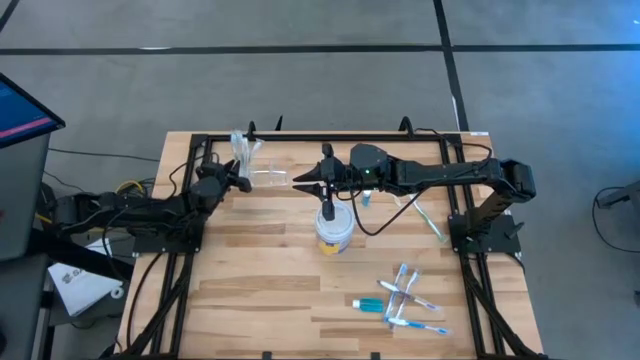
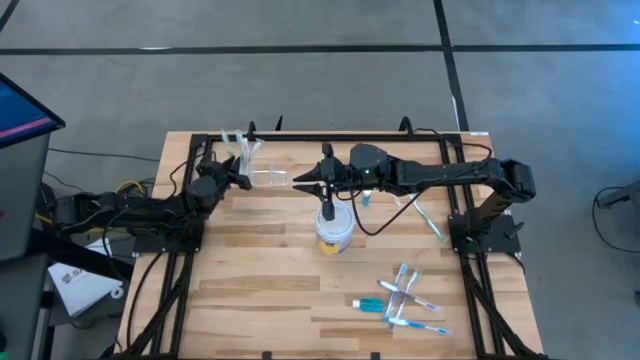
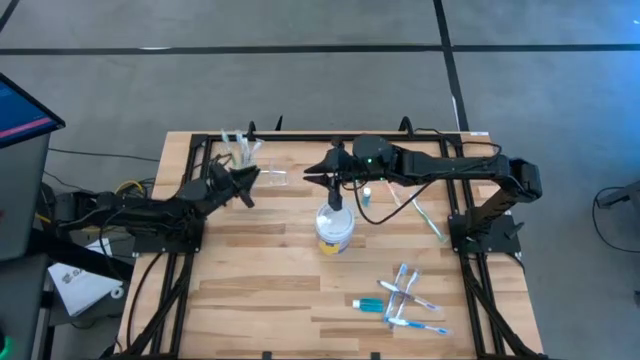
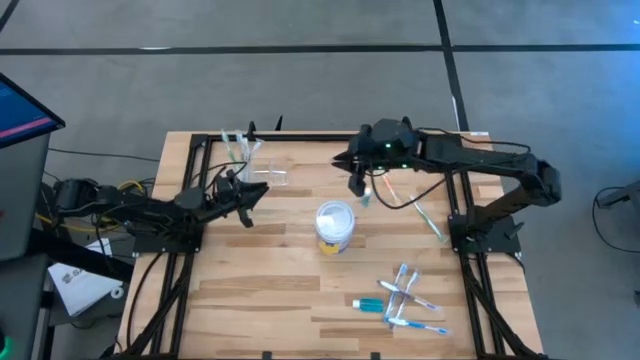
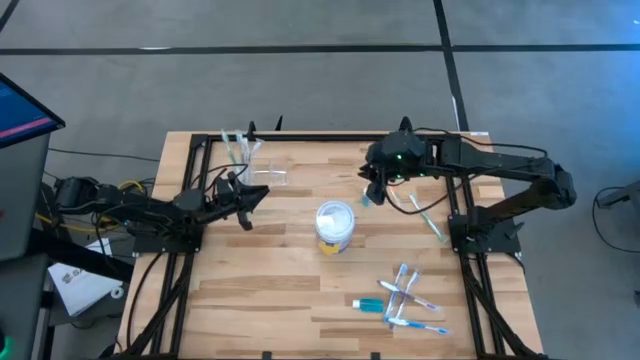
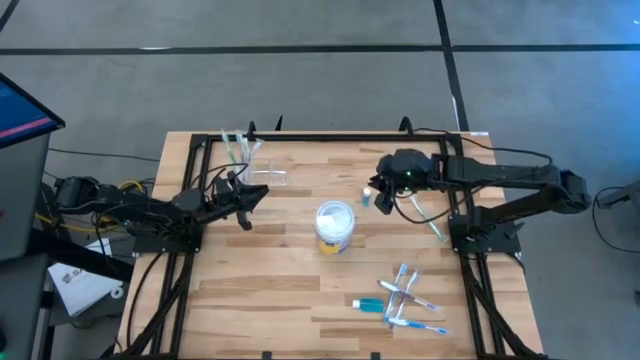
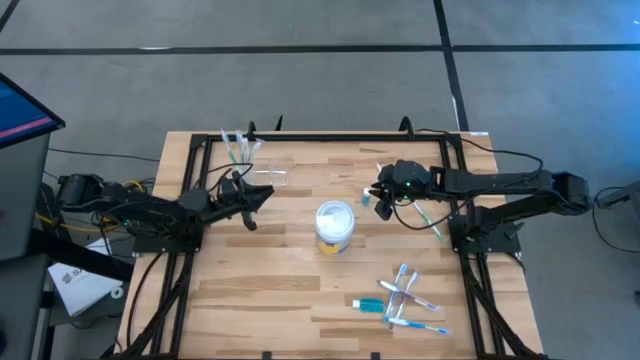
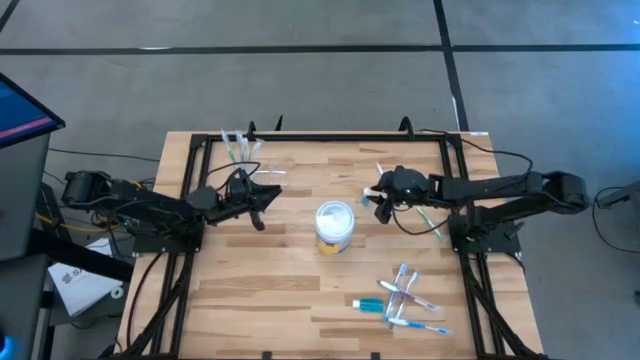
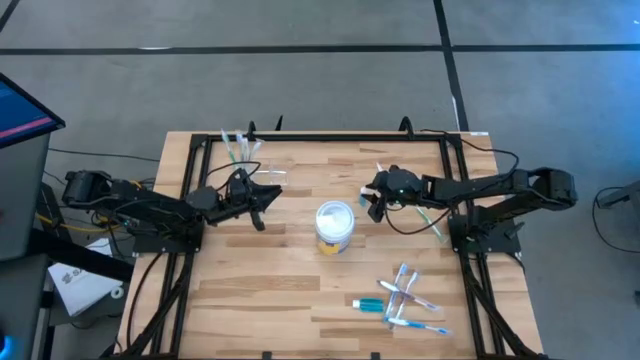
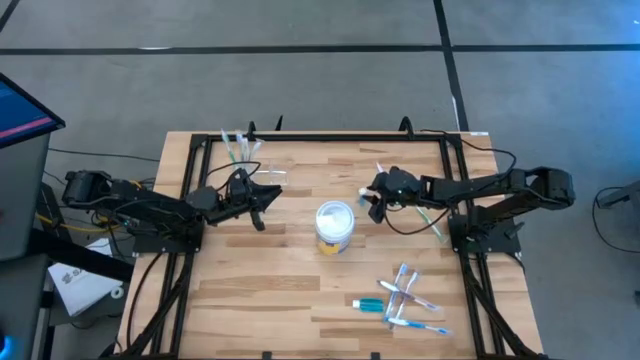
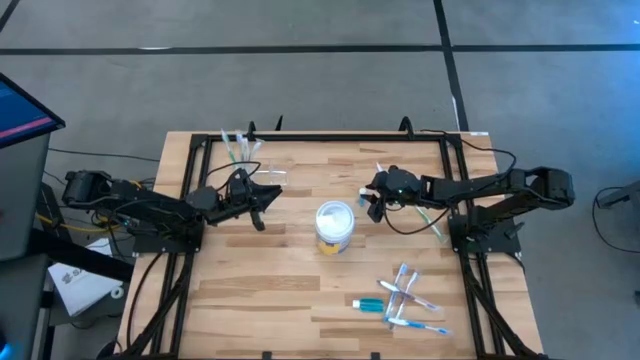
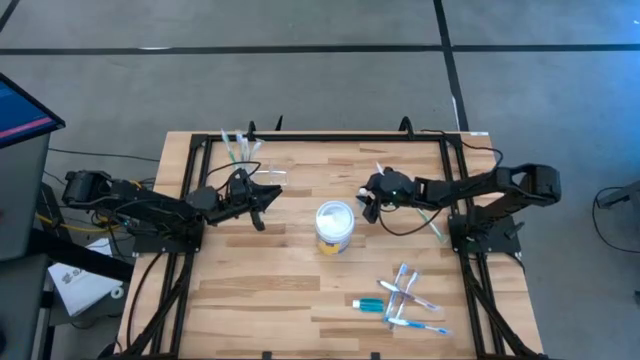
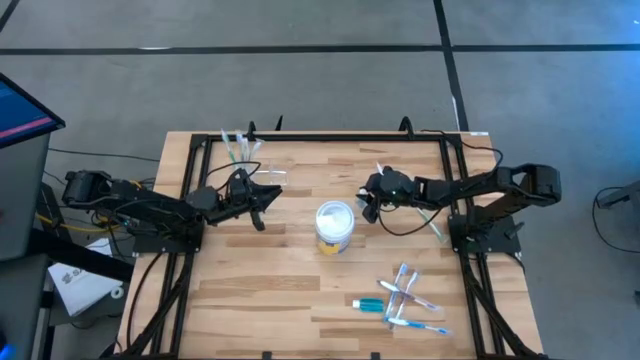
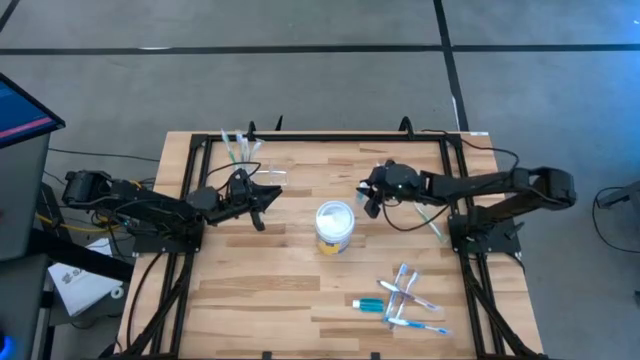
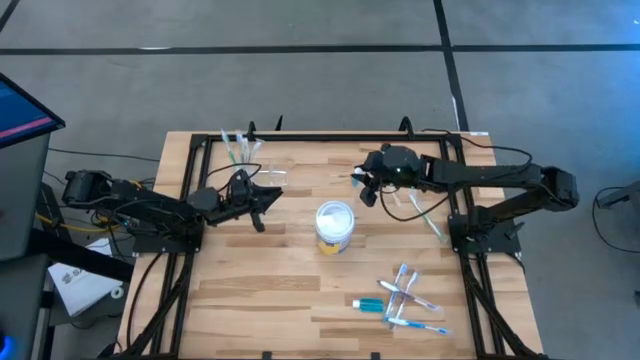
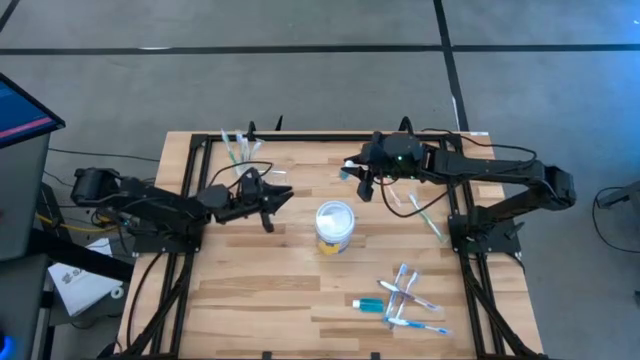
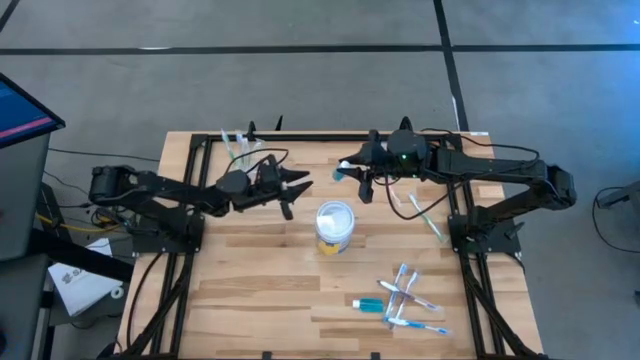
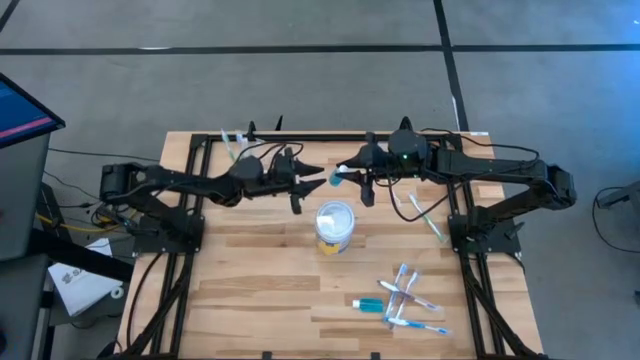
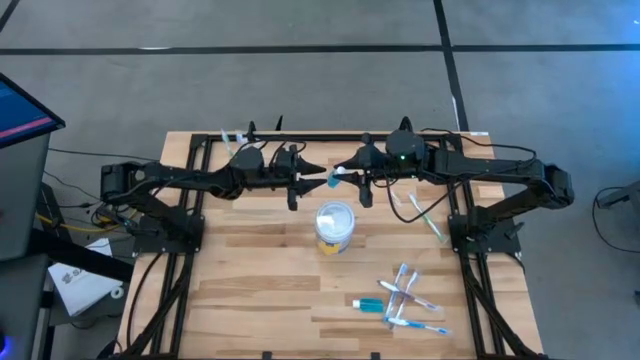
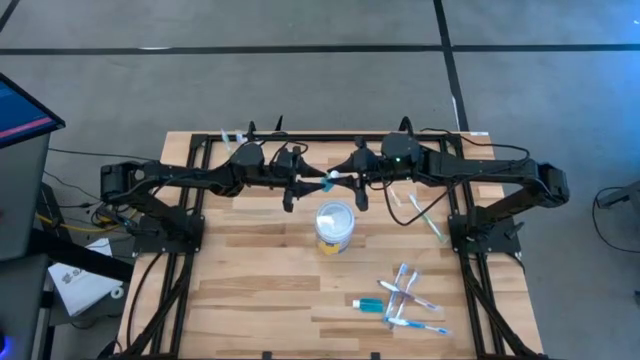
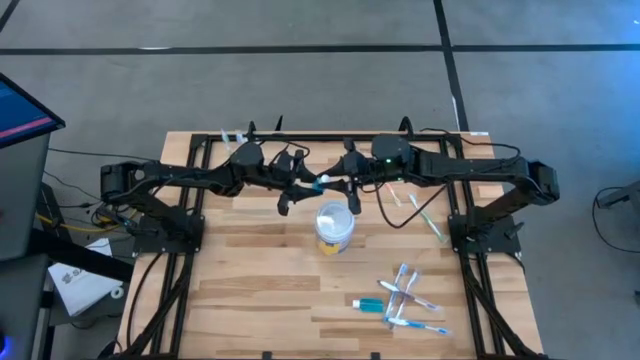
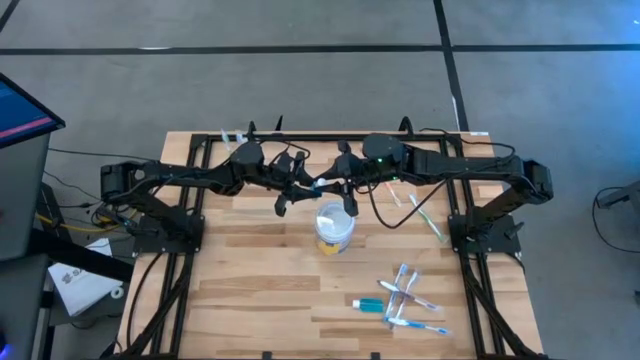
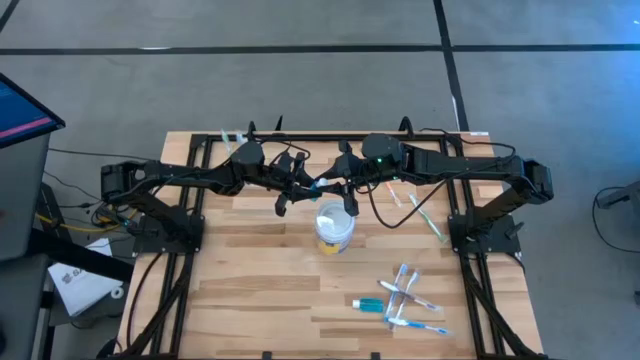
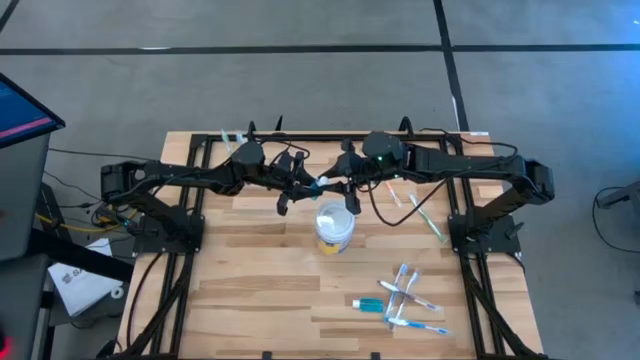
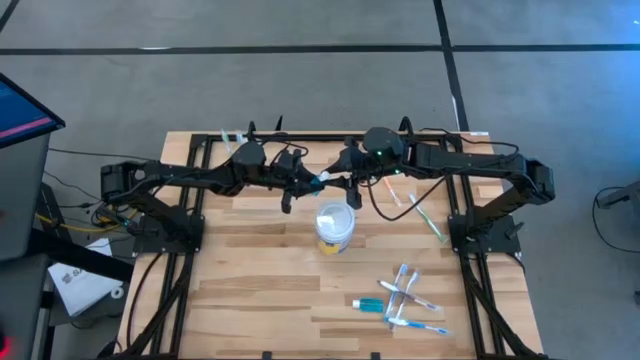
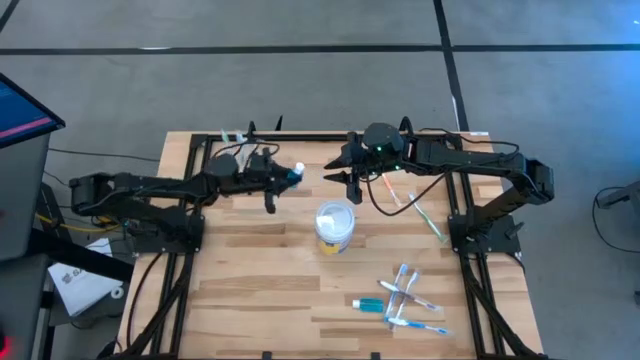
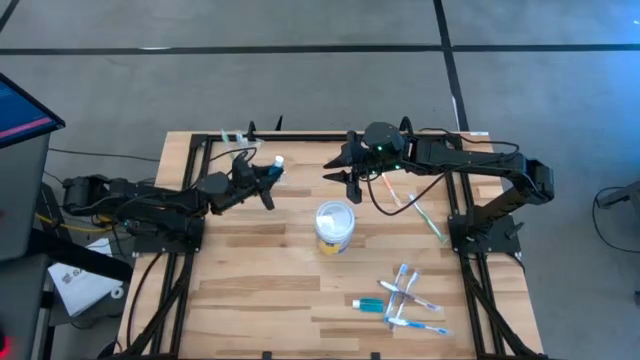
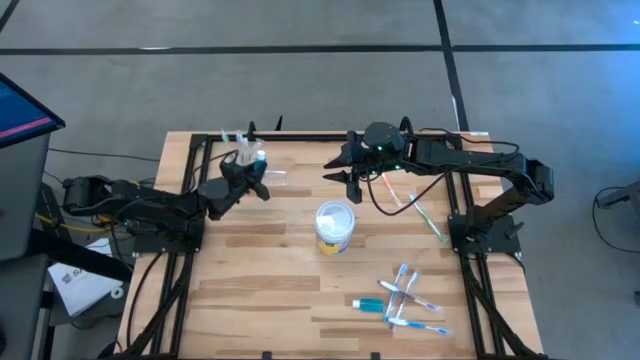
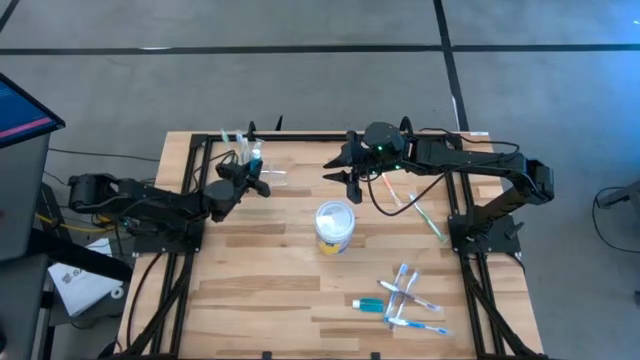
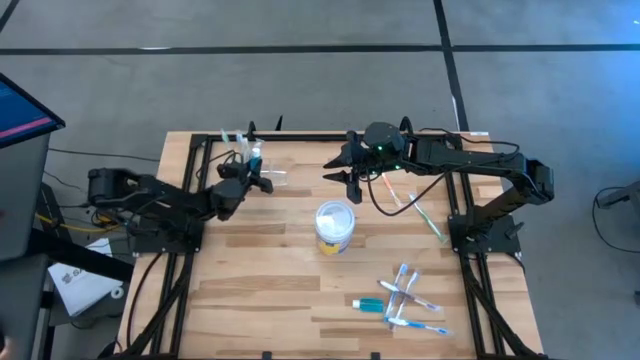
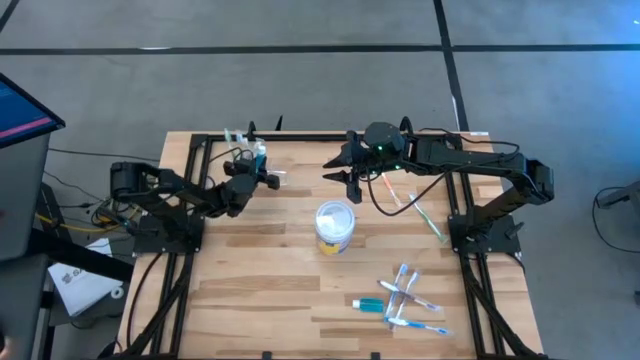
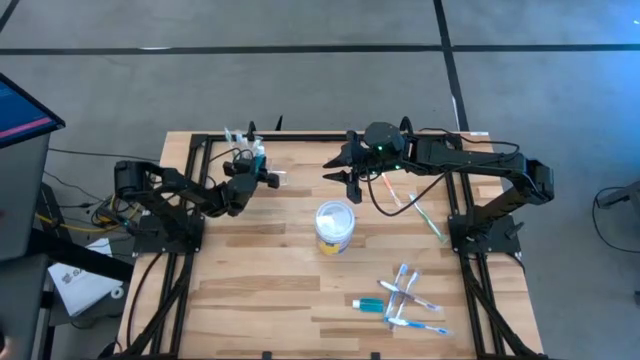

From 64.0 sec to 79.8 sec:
Task: Pick & Place toothbrushing station
Put the top mouthwash into the transparent organizer

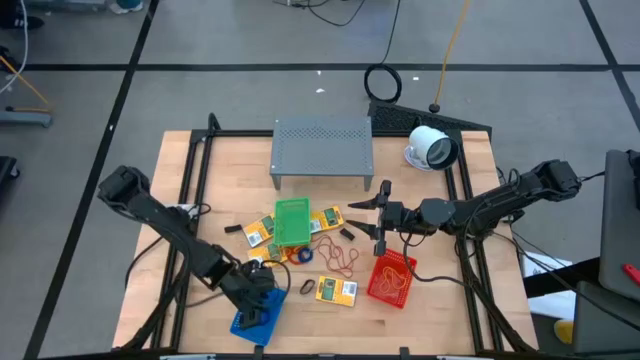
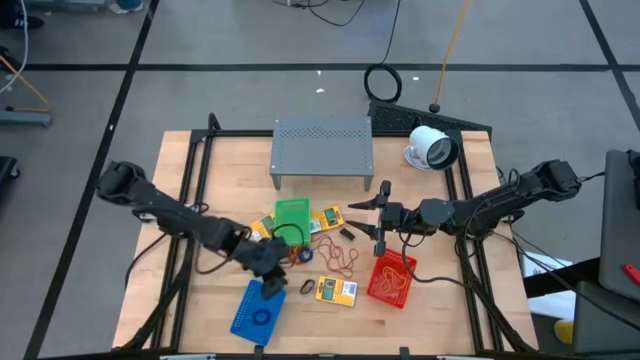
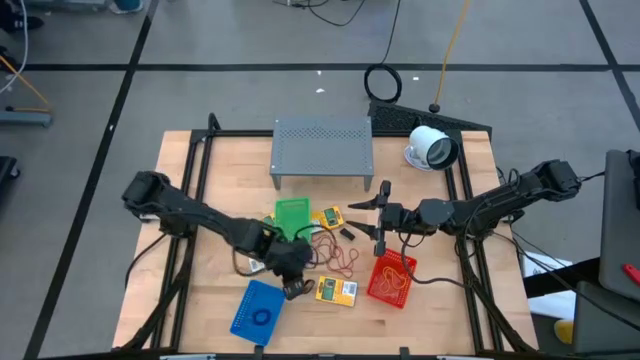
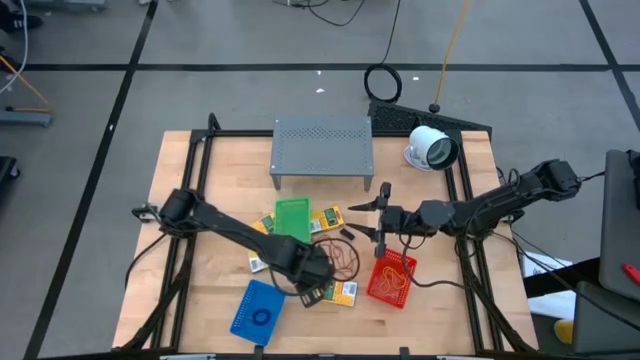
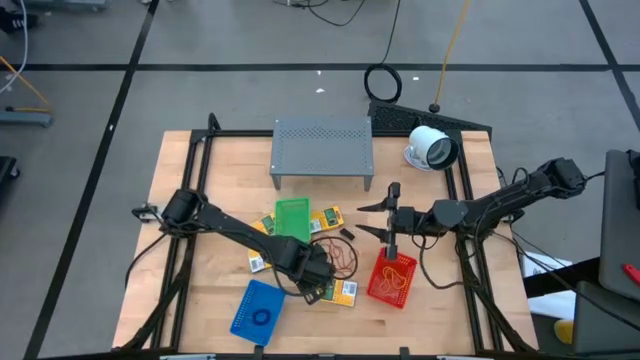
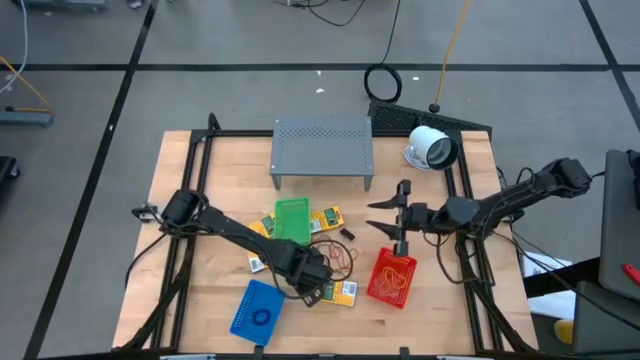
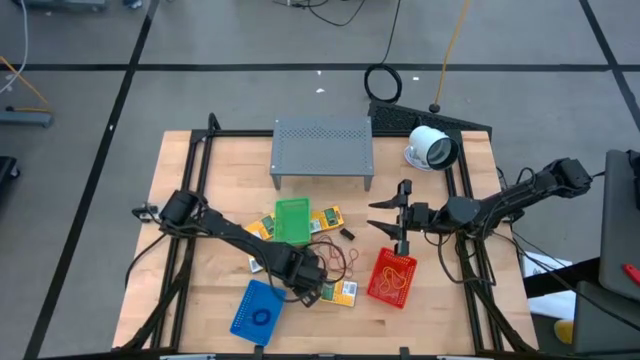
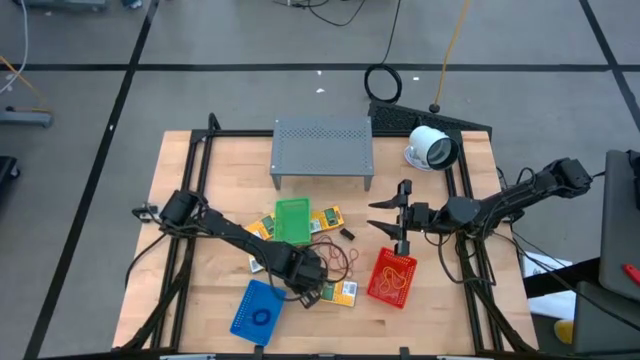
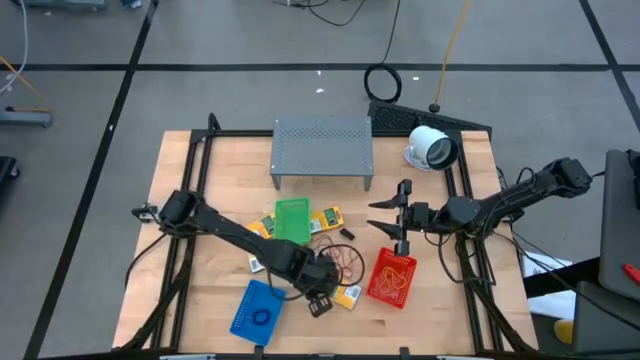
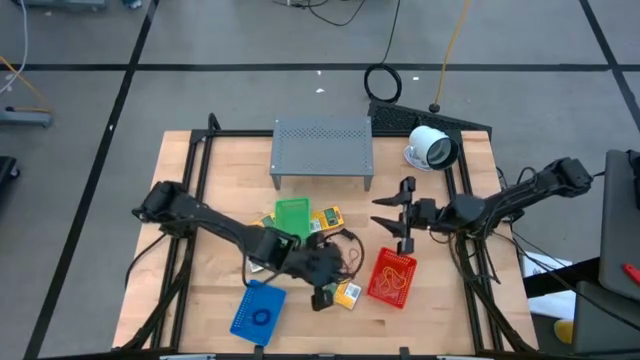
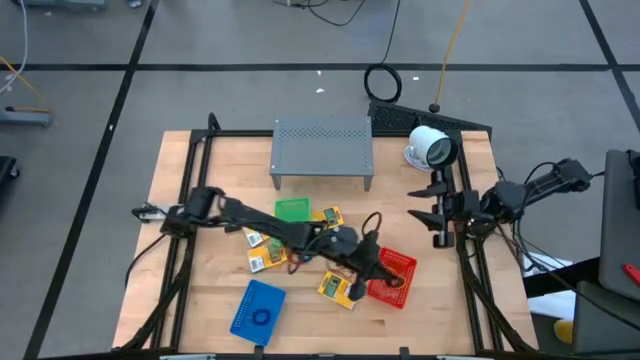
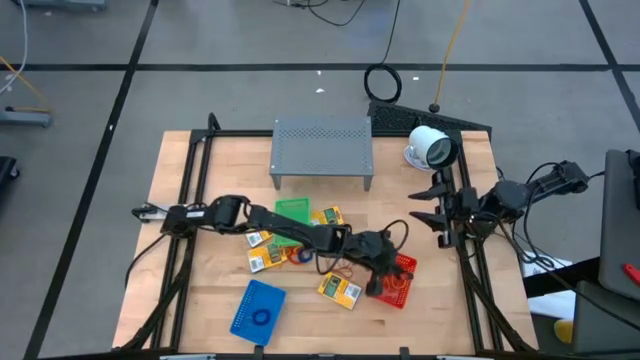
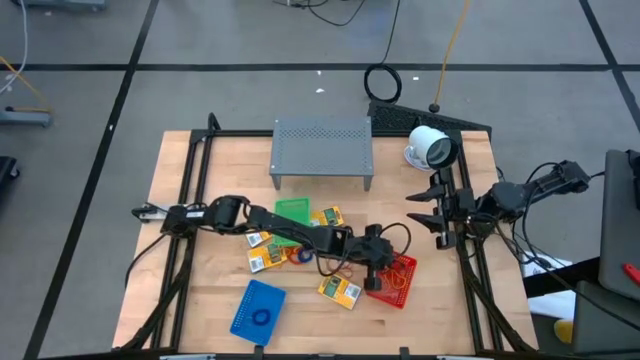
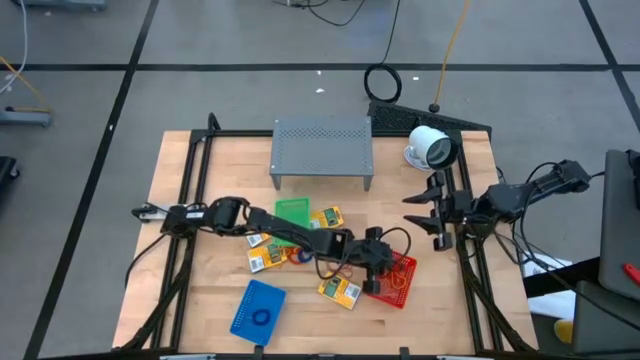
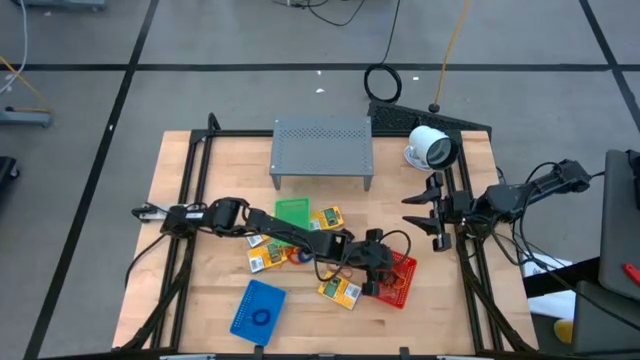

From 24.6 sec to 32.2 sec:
Task: Pick & Place Office Desk Supplies
Put the black rubber band into the red bin
